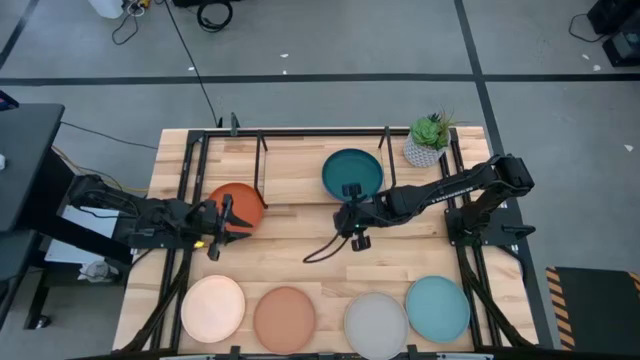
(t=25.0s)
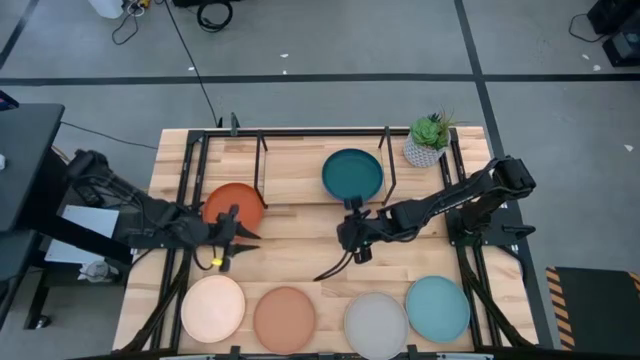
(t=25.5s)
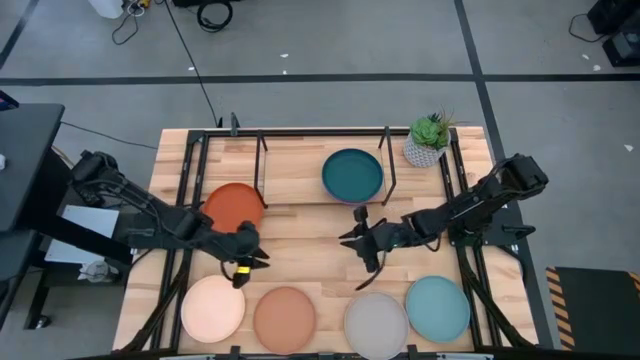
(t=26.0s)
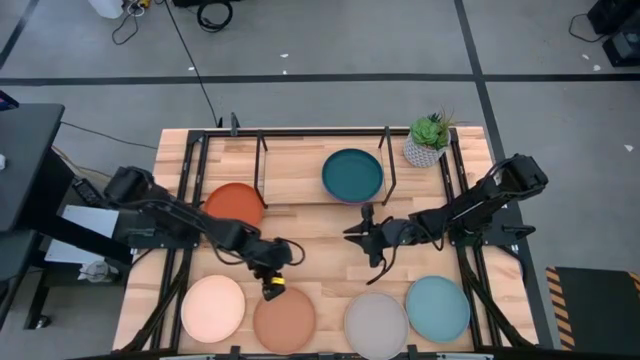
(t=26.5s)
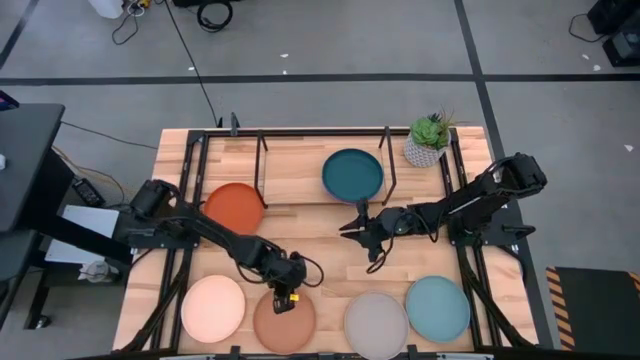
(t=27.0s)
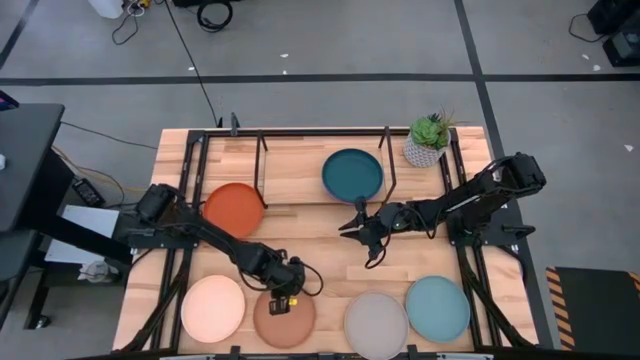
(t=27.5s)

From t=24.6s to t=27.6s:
Task: Place and stack plates onto a shelf
Put the brown plate on the shelf

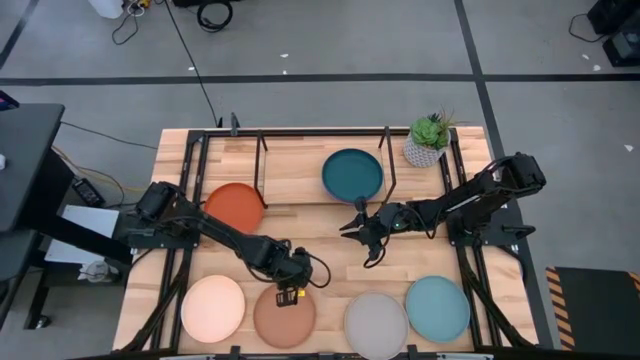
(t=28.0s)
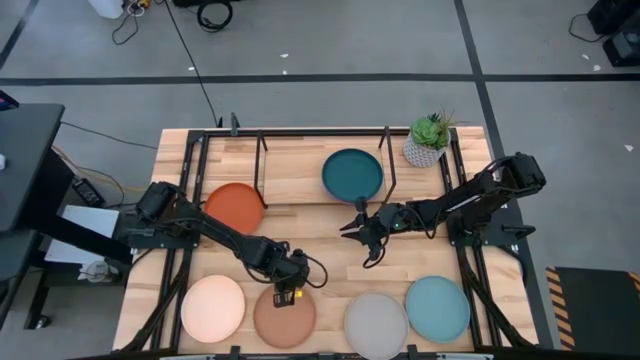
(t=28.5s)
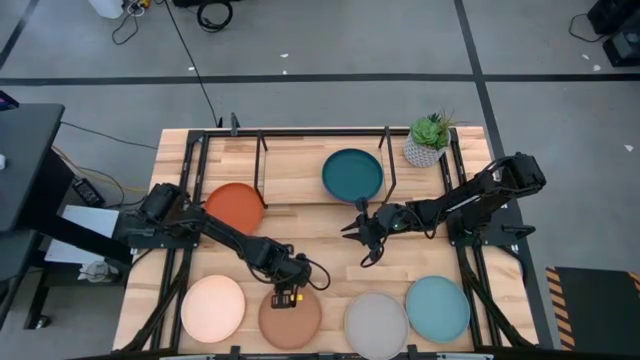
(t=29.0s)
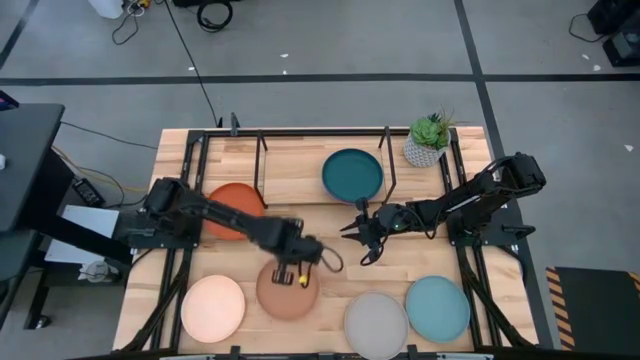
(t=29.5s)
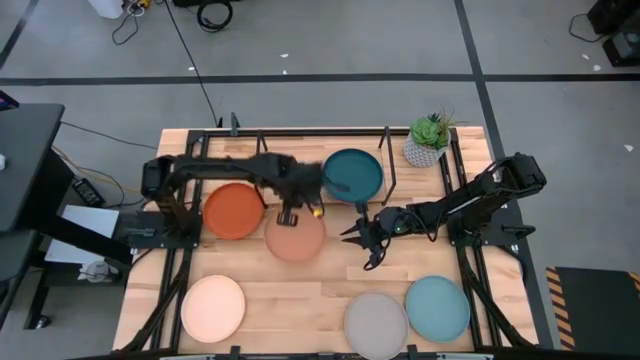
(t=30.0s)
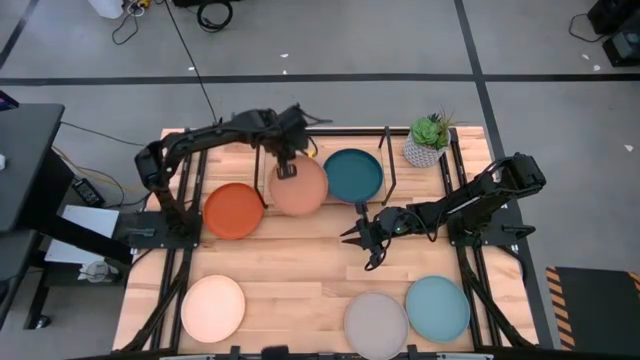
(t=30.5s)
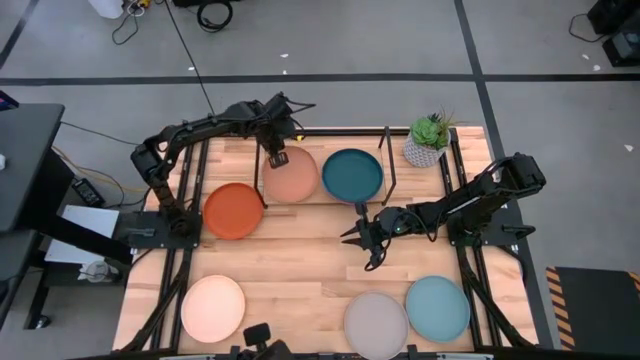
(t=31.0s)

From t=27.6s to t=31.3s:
Put the brown plate on the shelf

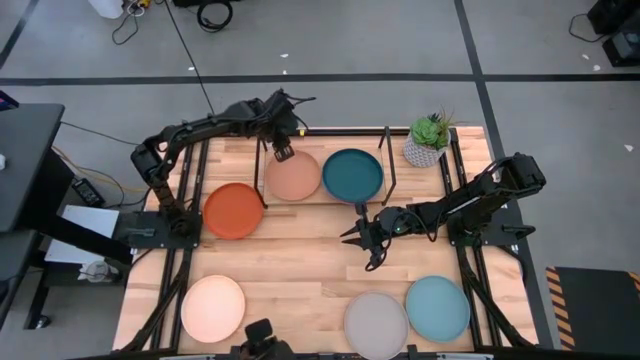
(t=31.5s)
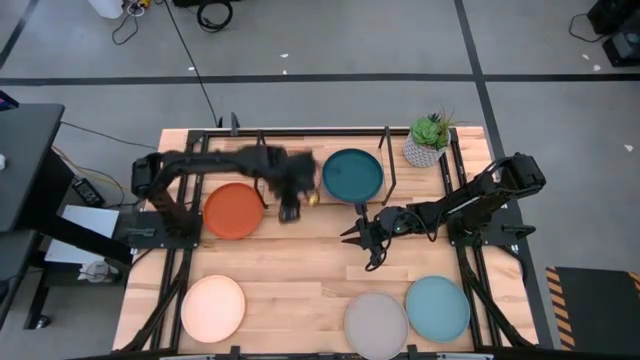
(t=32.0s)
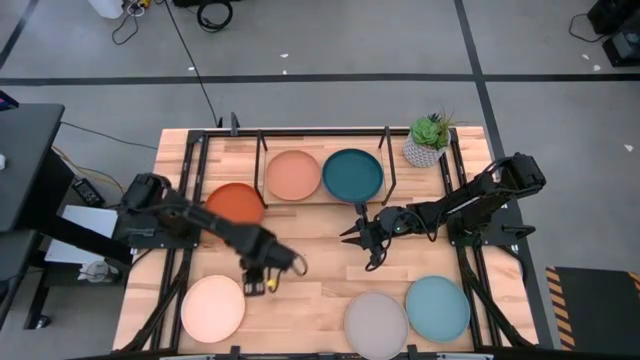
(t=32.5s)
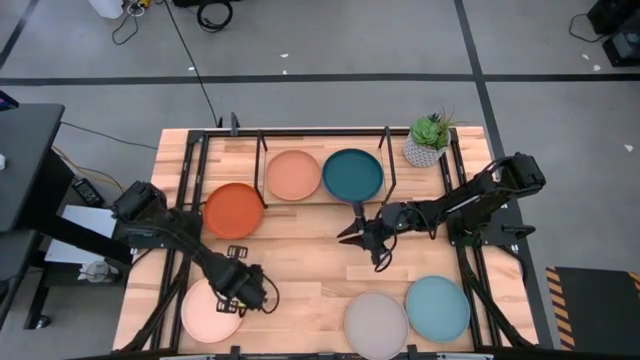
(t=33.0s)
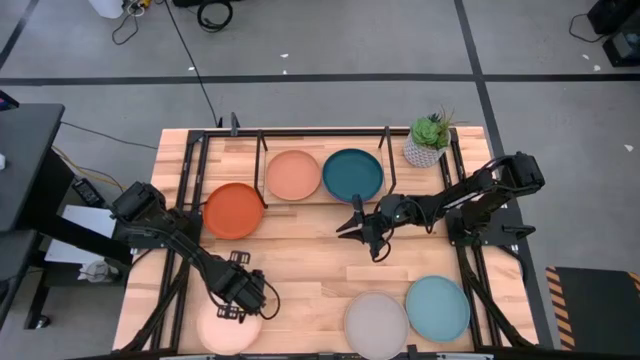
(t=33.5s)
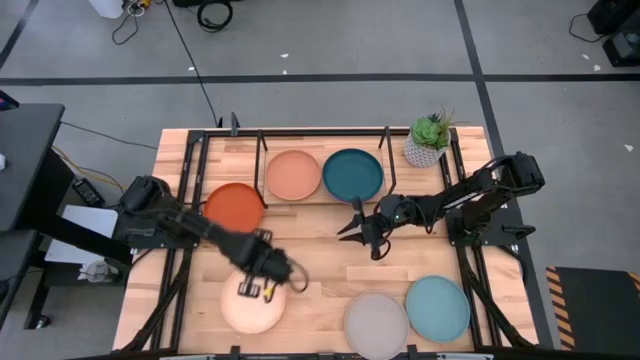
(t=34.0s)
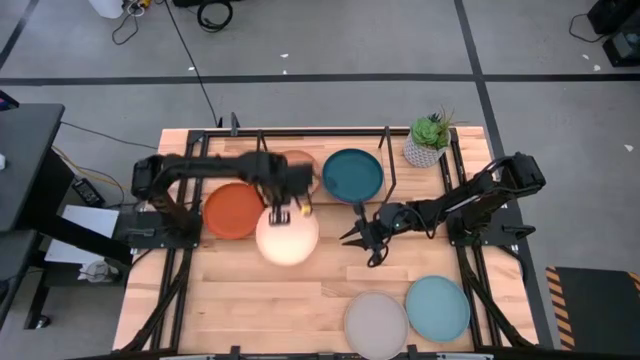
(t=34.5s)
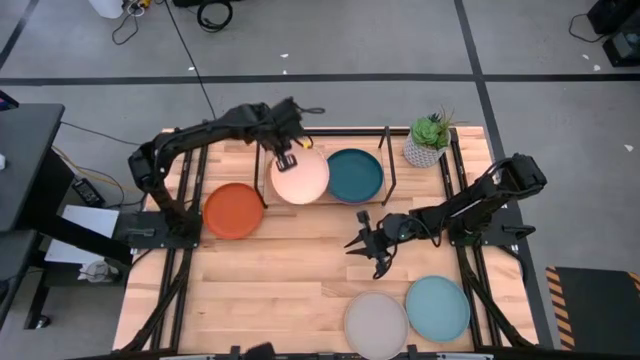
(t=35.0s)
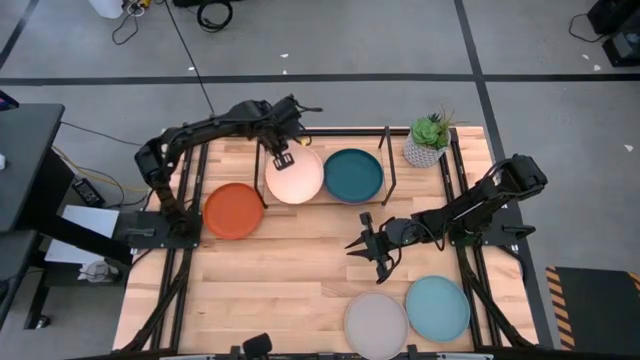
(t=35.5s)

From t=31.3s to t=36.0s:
Stack the light orange plate on top of the brown plate on the shelf

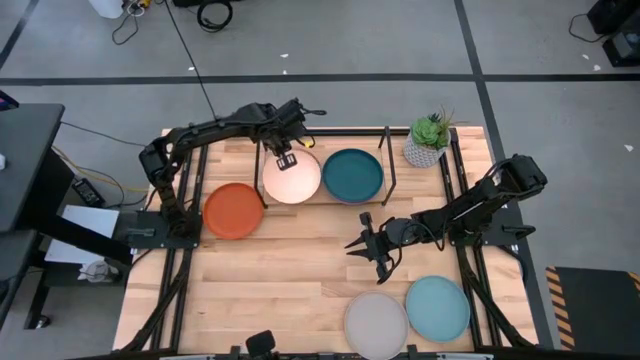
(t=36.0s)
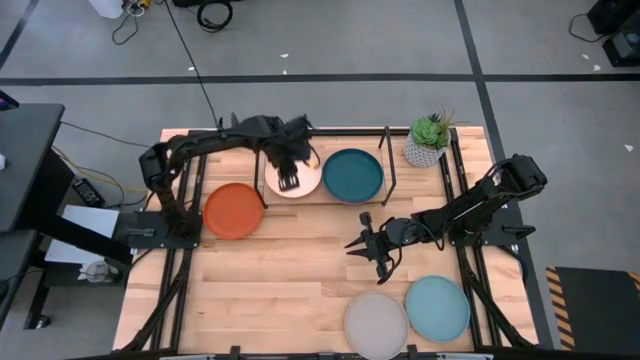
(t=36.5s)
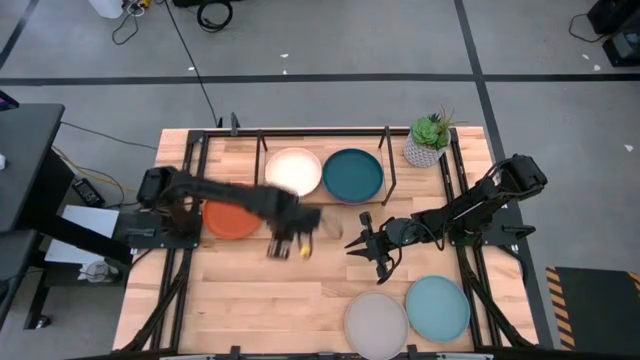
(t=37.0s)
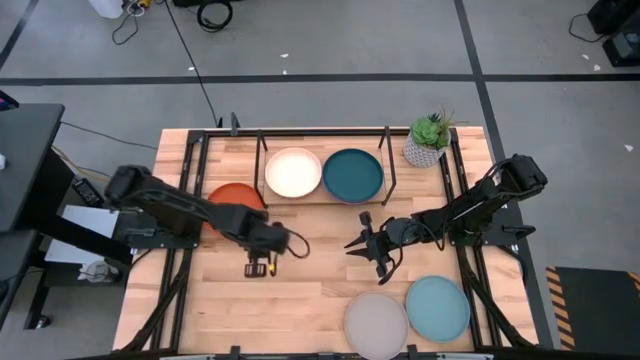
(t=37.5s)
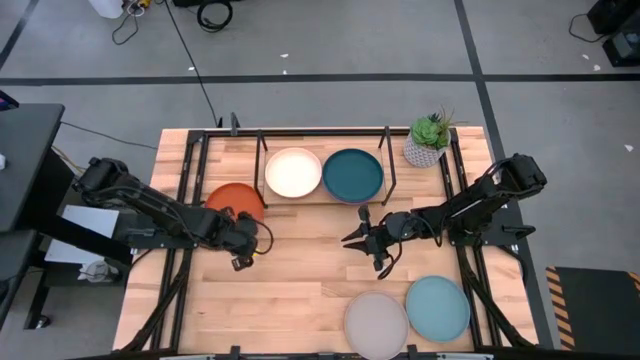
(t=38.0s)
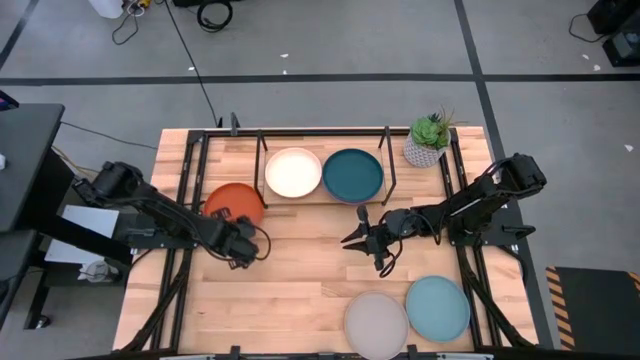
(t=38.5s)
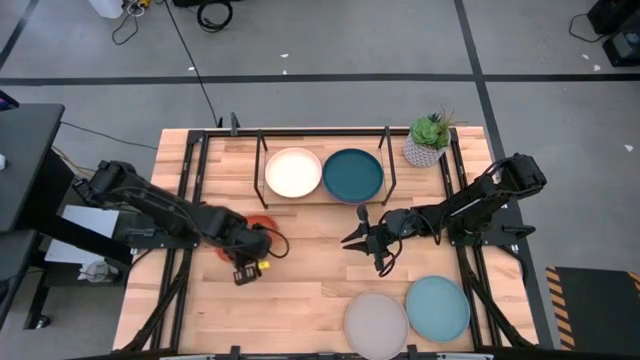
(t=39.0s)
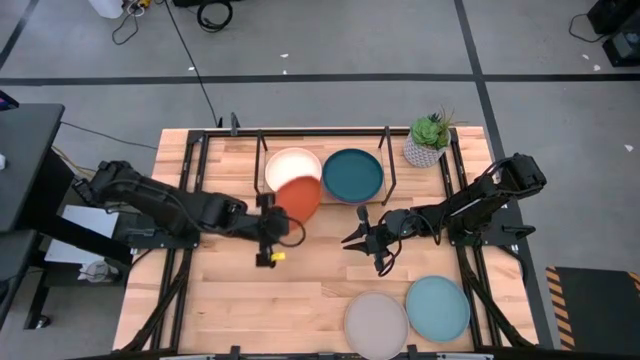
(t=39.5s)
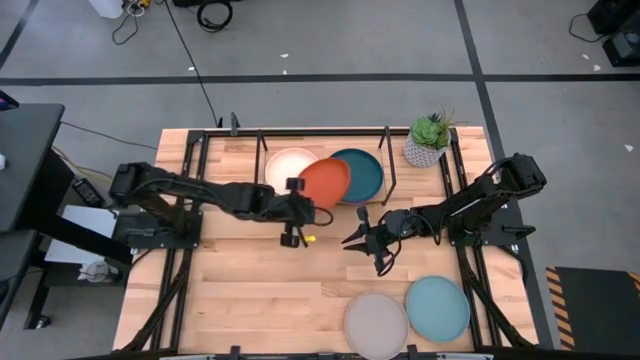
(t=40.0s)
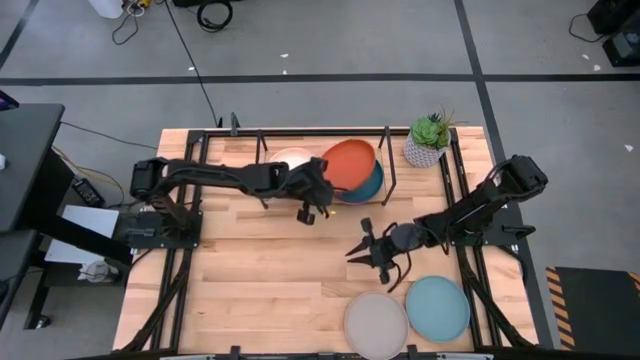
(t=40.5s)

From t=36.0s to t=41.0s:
Stack the orange plate on top of the green plate on the shelf

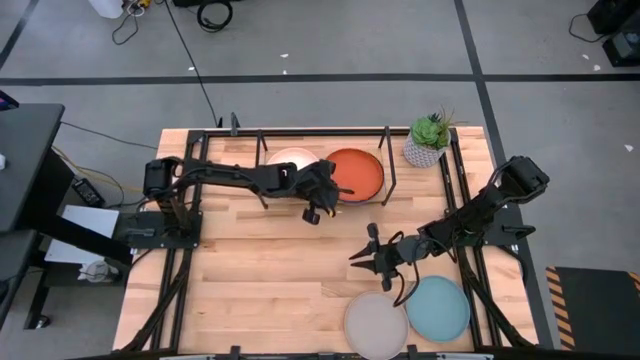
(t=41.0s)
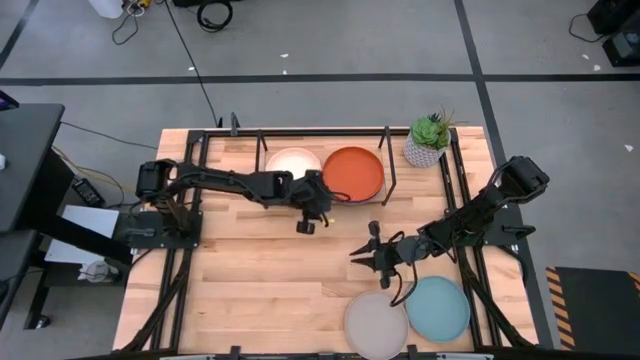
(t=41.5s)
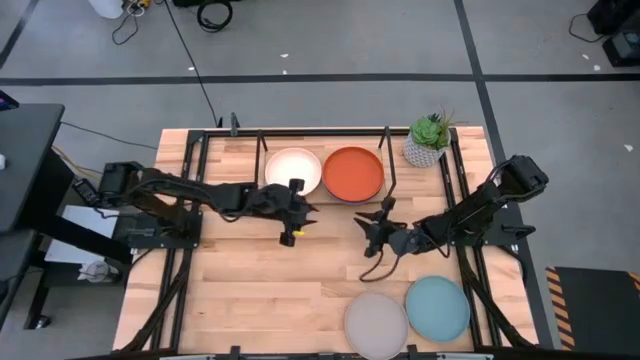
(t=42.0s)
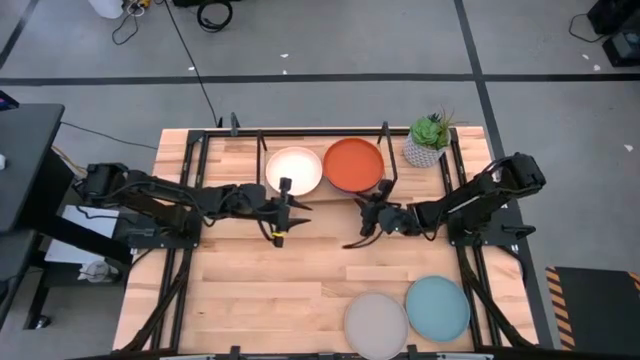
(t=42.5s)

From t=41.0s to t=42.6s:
Adjust the right stacked plates on the shelf

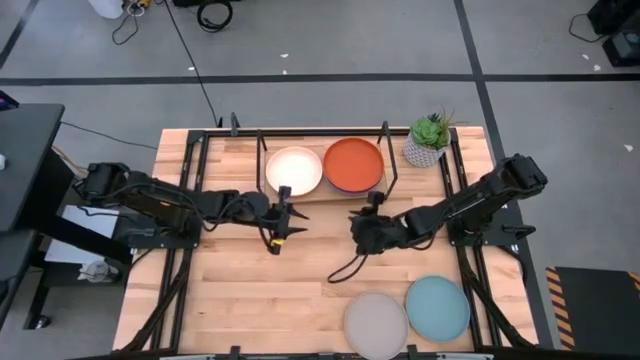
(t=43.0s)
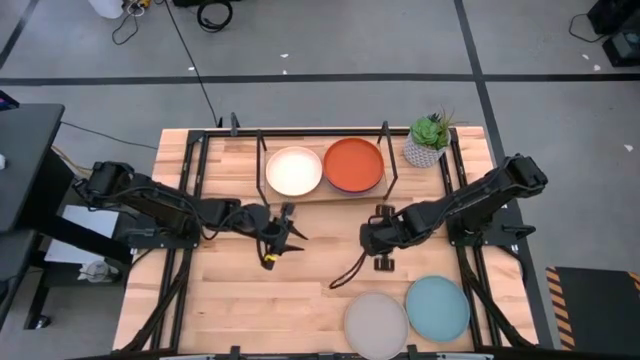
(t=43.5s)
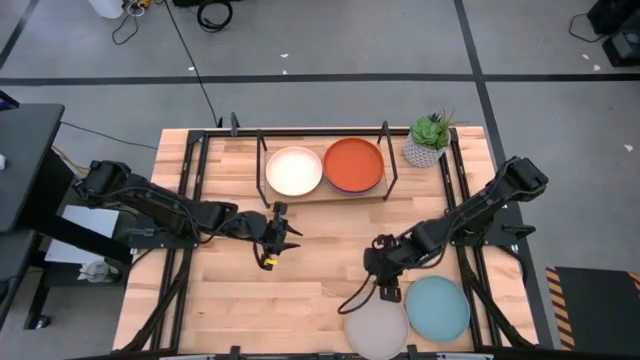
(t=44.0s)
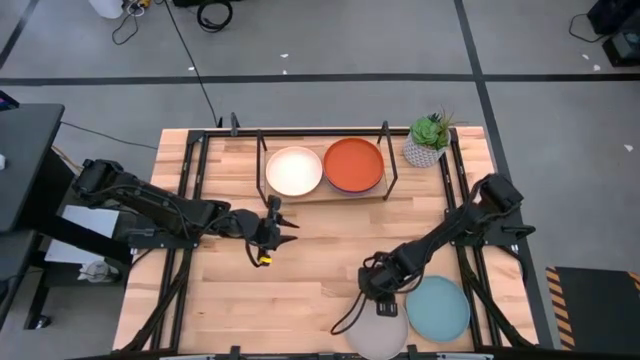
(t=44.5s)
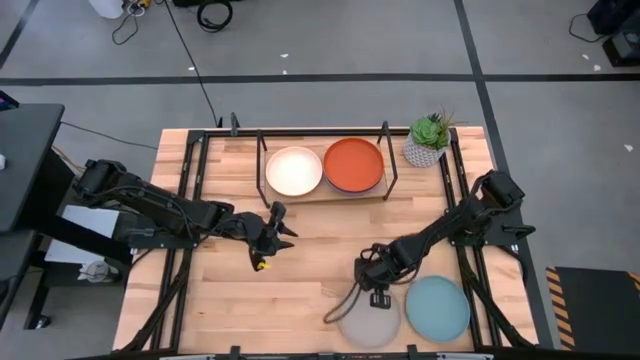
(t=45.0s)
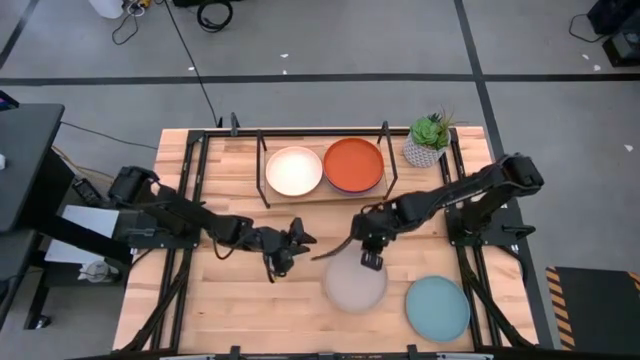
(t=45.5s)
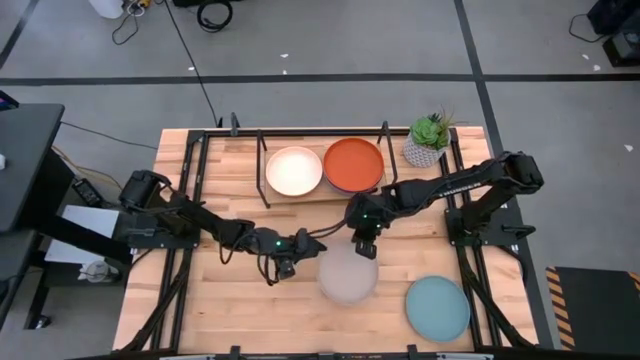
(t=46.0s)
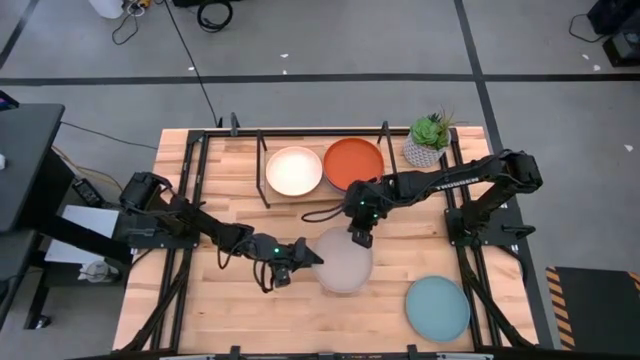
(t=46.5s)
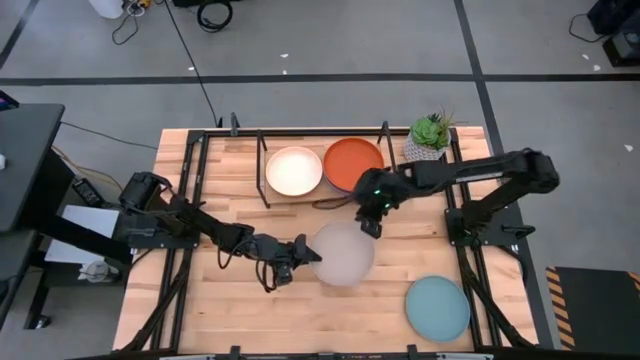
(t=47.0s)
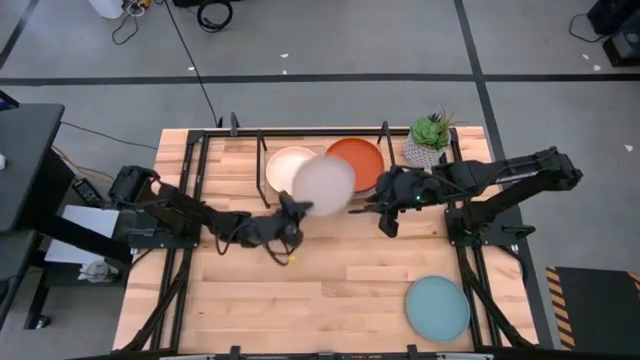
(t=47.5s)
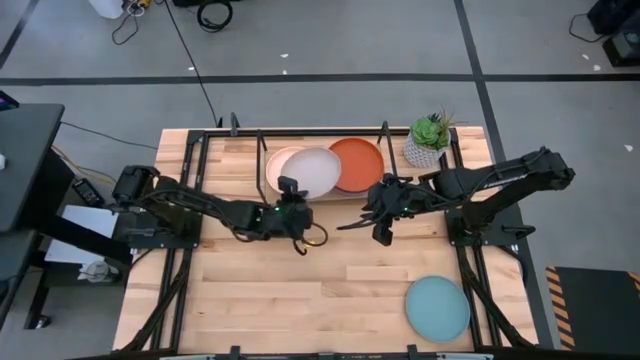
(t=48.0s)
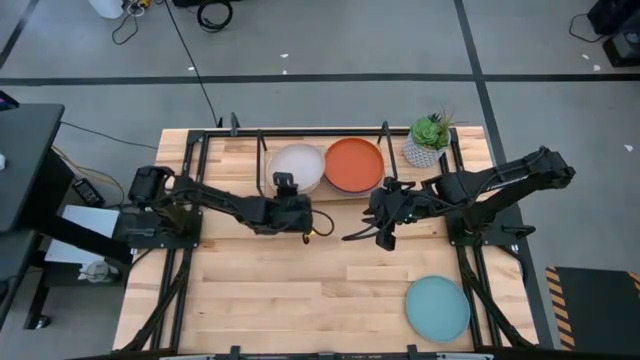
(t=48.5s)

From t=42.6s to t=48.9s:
Stack the gray plate on top of the light orange plate on the shelf
